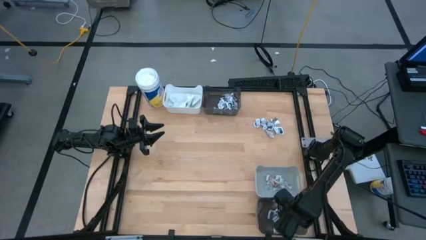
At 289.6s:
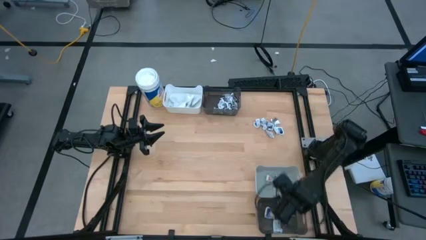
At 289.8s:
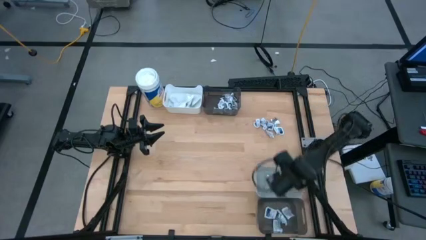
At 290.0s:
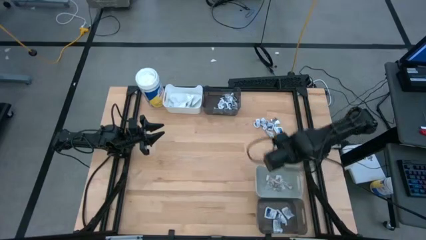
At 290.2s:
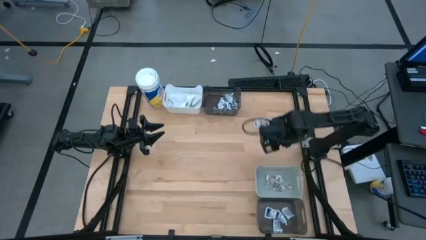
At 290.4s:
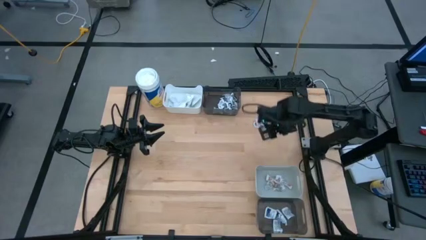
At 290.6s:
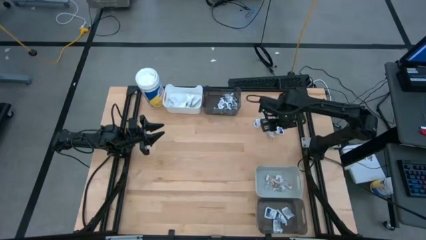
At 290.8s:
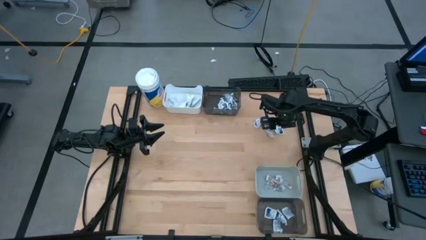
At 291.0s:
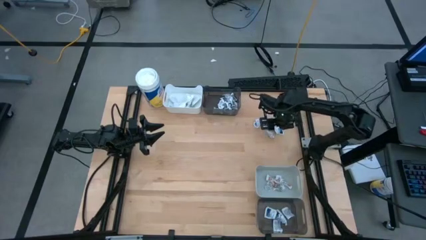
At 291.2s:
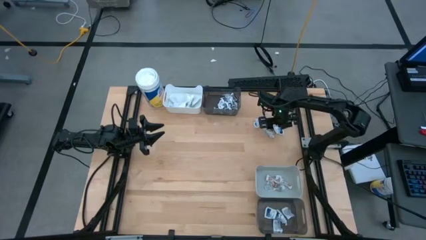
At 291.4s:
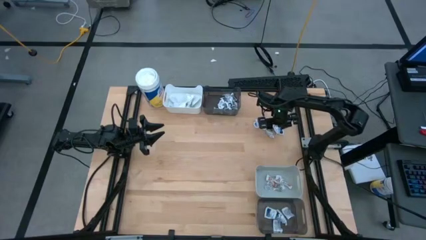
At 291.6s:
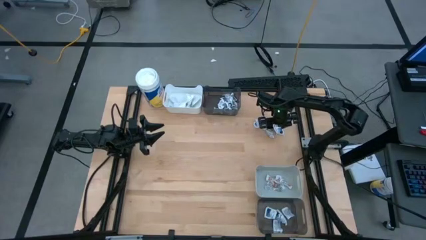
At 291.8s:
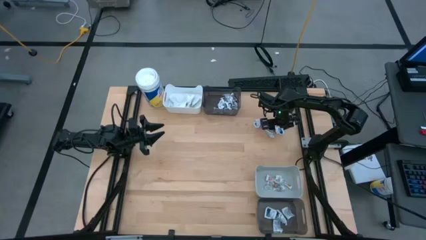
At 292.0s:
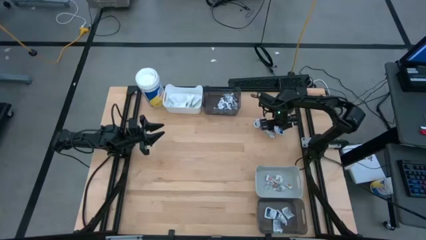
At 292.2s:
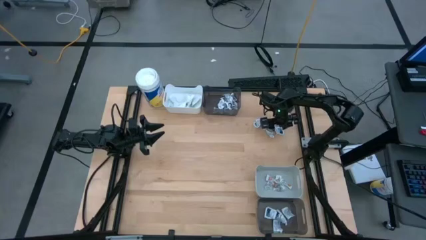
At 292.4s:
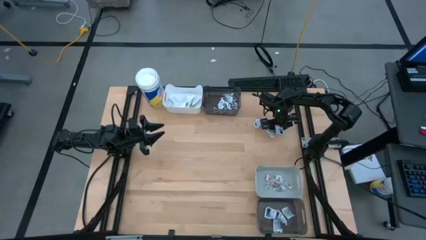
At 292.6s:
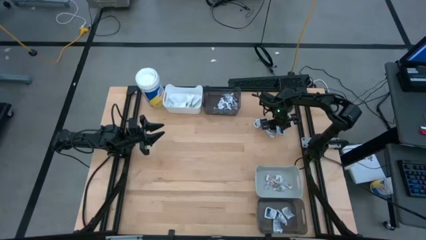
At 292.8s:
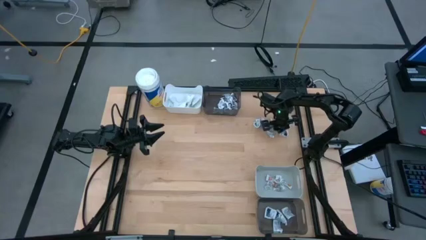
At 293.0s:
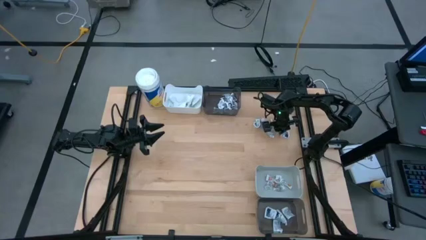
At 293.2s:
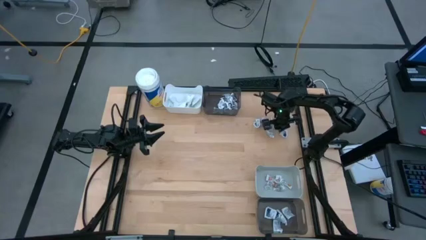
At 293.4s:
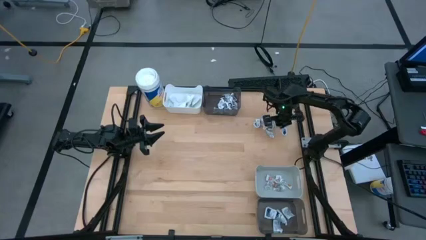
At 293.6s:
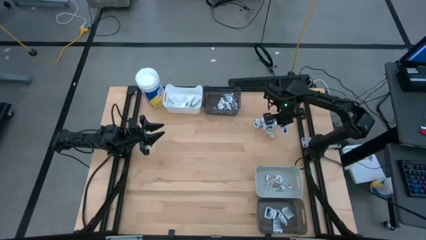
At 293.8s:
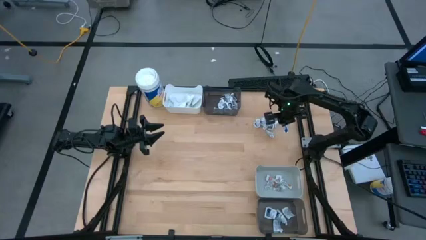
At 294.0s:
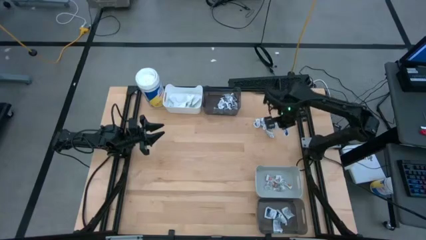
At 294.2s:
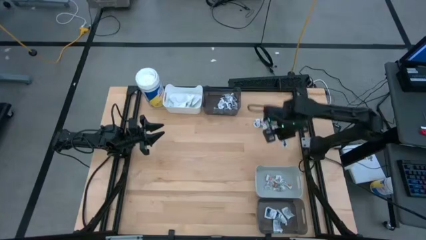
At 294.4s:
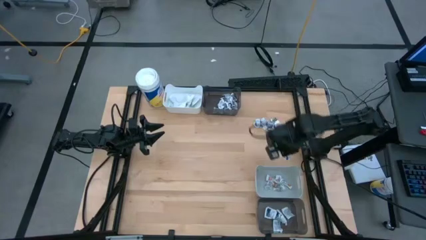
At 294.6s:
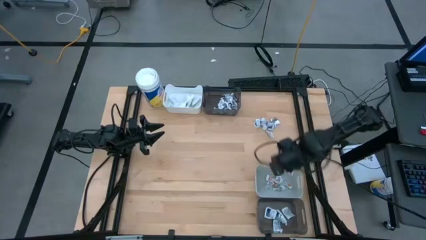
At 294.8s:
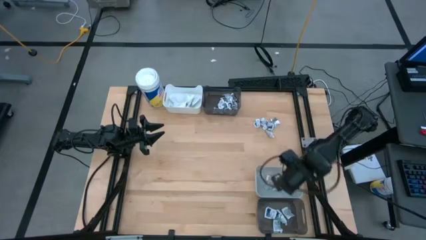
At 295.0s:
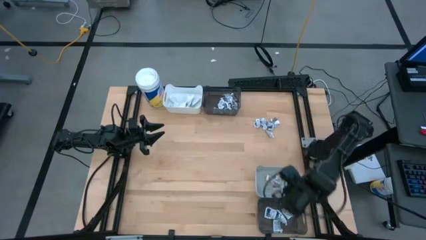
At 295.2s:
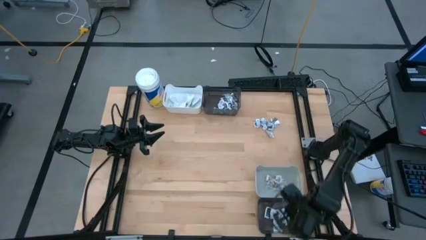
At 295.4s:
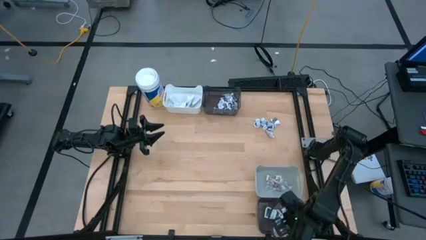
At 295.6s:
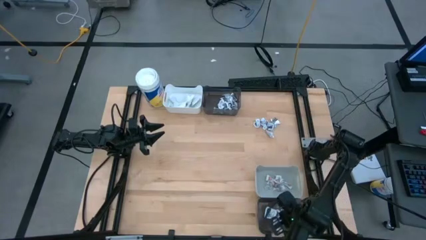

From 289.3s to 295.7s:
Task: Pick & Place First Aid Supplies
Put the blue alcohol pad into the bottom black bin

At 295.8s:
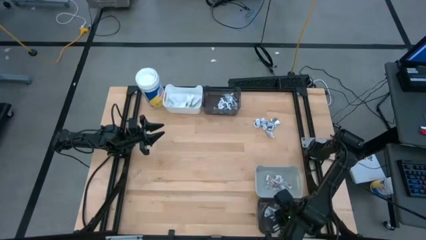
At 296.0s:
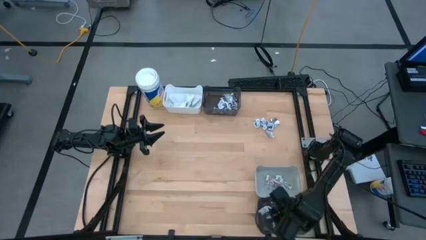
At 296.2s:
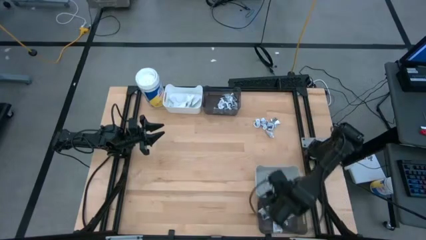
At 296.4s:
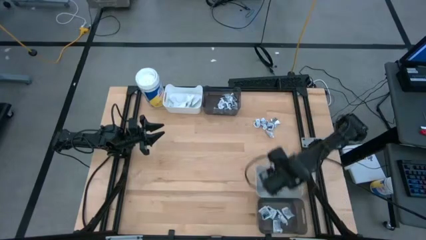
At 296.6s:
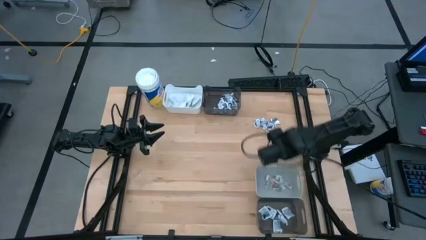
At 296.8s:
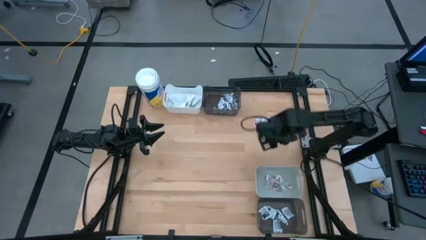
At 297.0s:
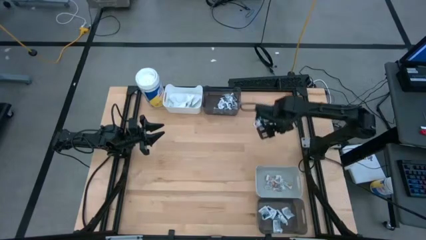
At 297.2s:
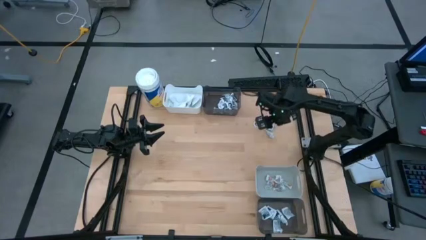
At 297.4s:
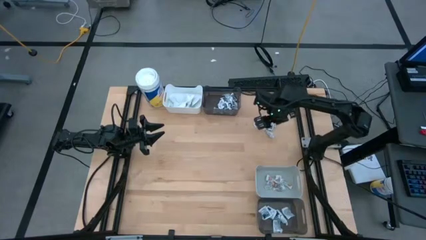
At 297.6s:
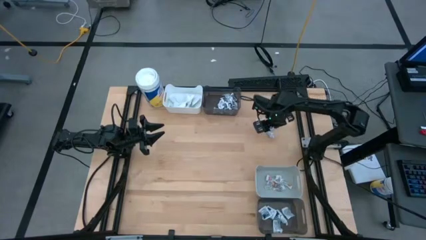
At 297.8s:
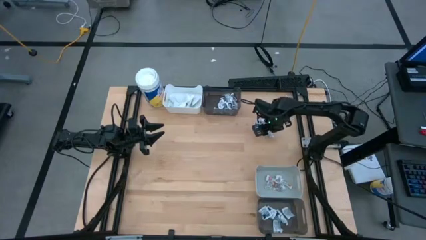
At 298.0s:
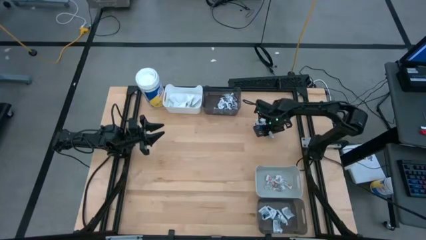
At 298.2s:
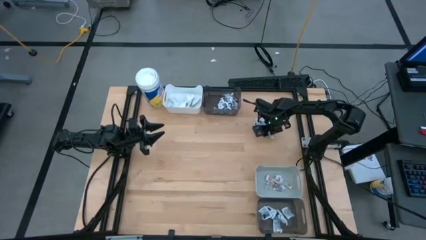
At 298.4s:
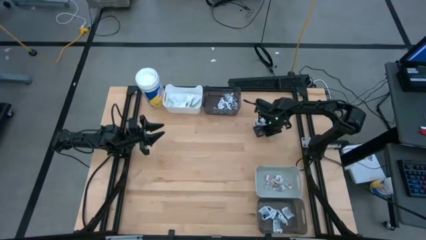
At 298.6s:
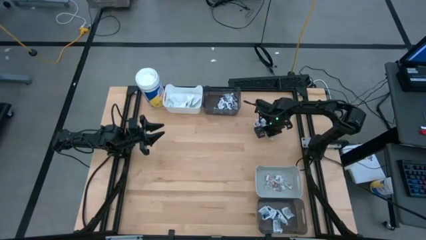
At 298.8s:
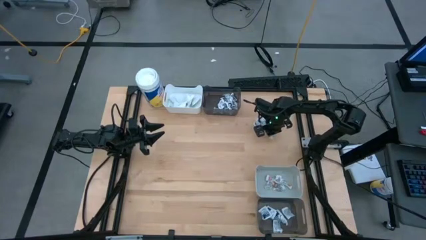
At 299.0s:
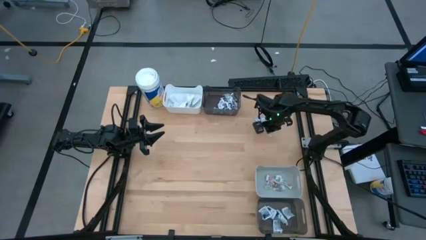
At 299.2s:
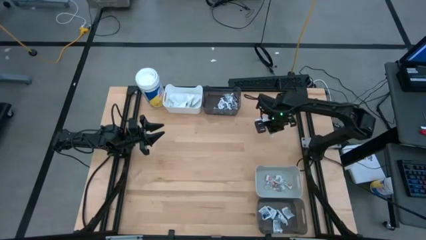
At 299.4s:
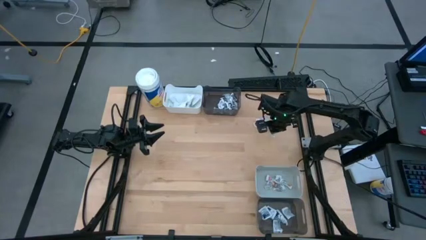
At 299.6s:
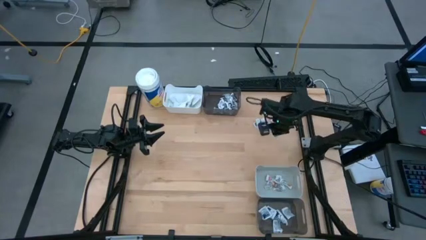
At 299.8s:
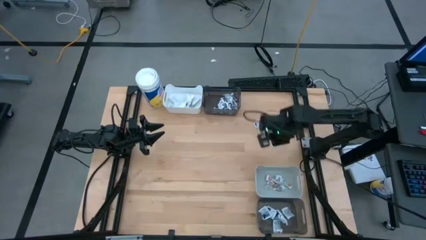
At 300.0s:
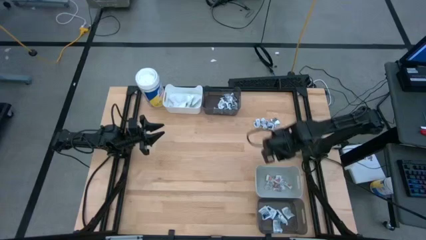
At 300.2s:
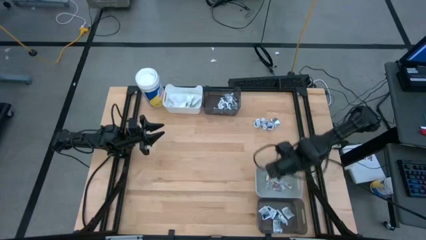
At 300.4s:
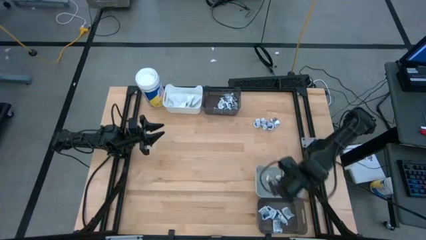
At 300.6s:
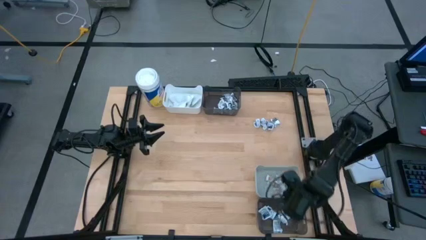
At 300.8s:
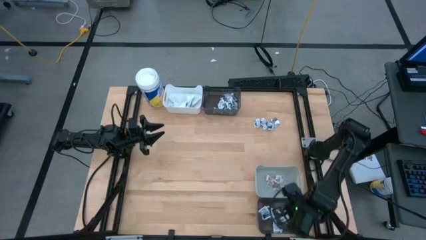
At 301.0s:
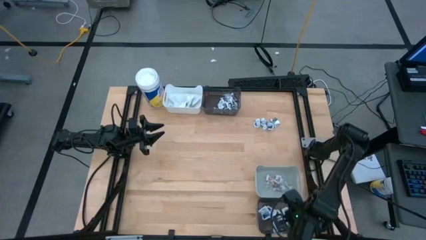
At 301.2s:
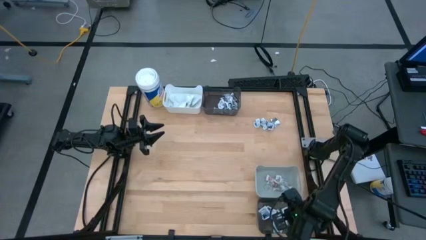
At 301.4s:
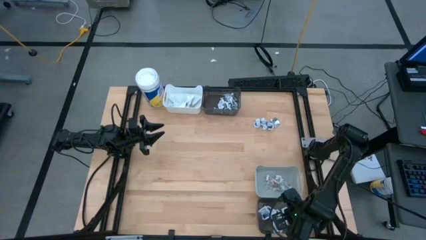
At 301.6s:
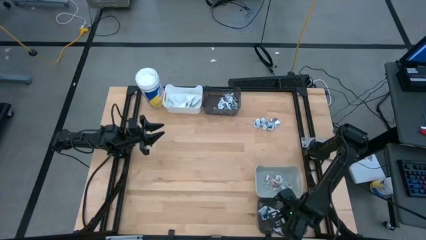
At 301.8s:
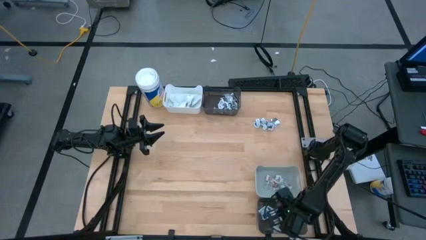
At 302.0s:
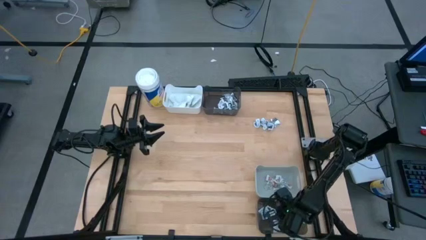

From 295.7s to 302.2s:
Put the blue alcohol pad into the bottom black bin

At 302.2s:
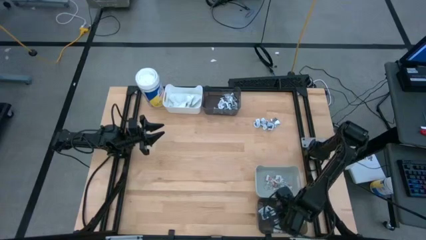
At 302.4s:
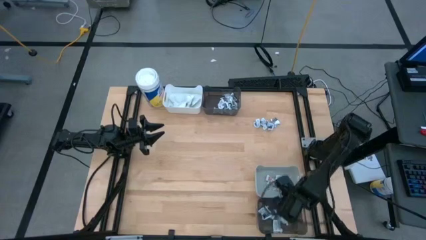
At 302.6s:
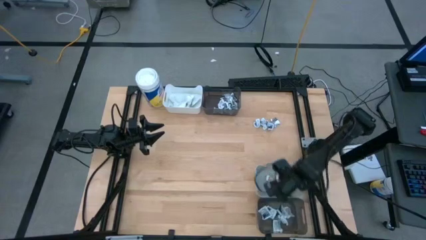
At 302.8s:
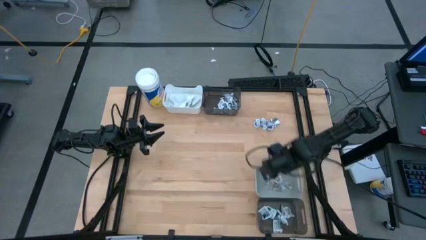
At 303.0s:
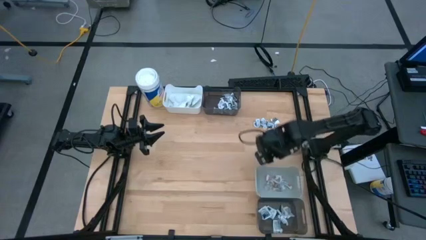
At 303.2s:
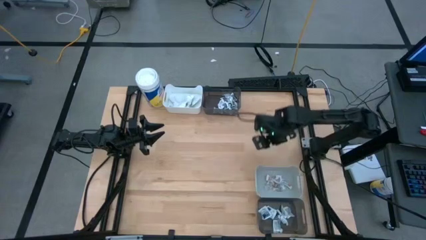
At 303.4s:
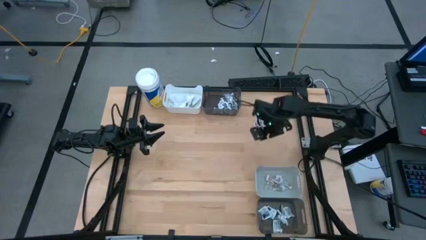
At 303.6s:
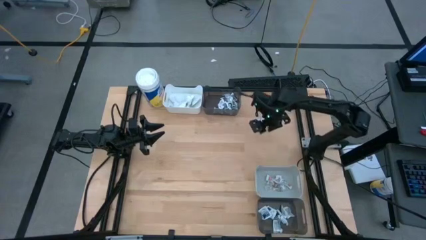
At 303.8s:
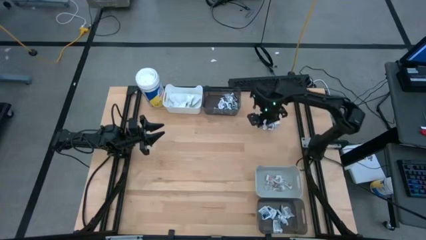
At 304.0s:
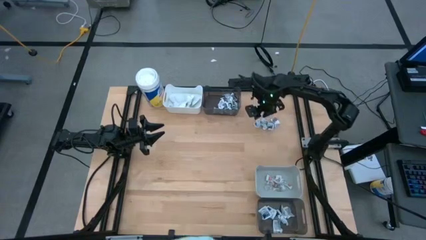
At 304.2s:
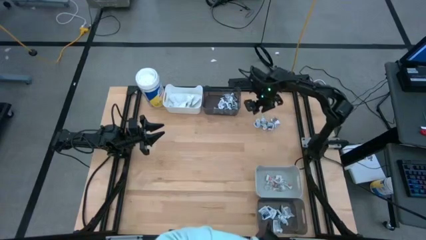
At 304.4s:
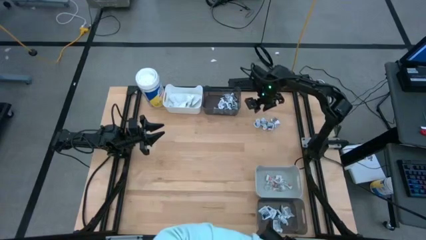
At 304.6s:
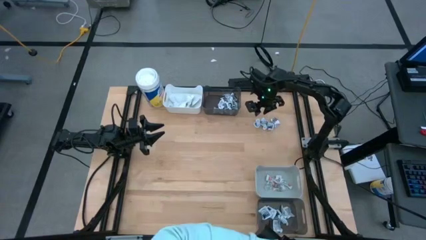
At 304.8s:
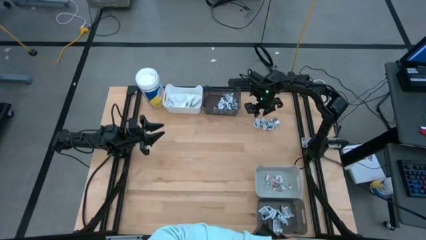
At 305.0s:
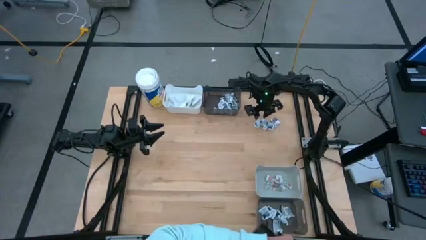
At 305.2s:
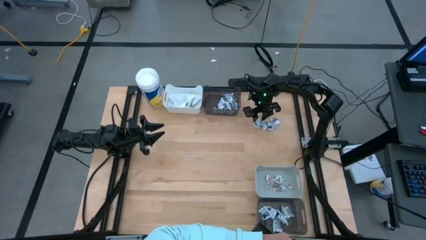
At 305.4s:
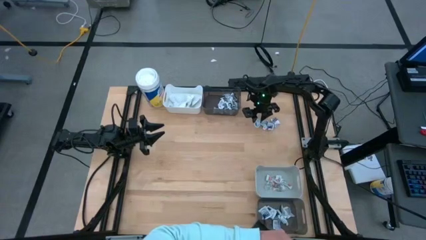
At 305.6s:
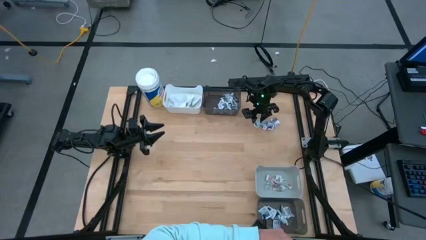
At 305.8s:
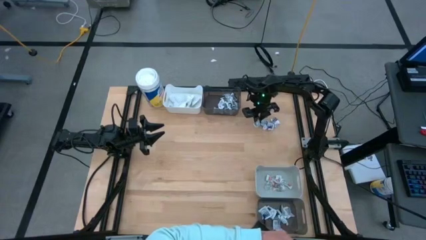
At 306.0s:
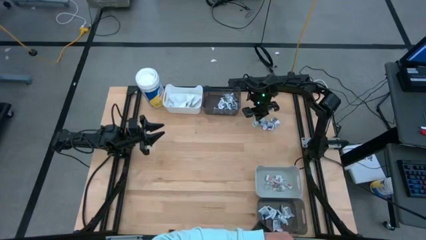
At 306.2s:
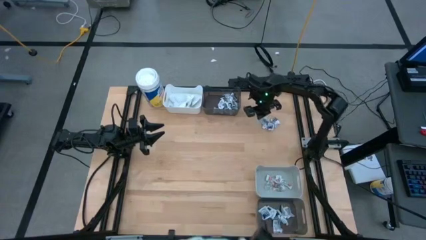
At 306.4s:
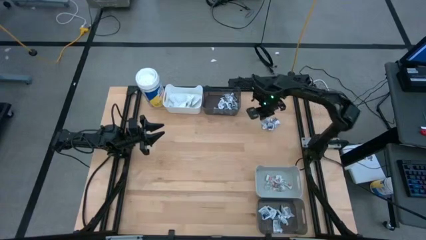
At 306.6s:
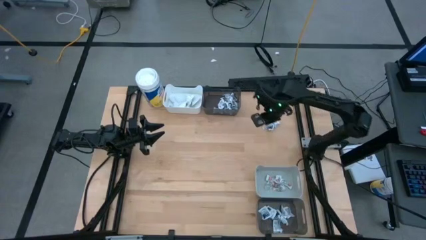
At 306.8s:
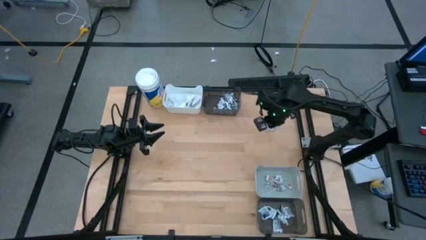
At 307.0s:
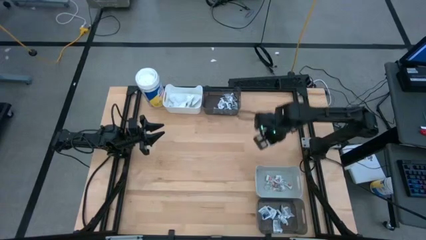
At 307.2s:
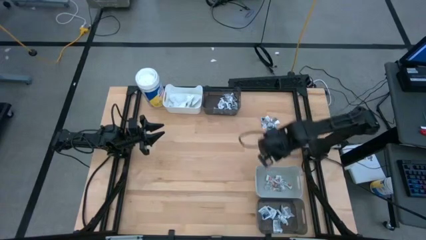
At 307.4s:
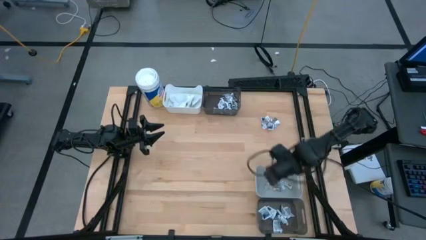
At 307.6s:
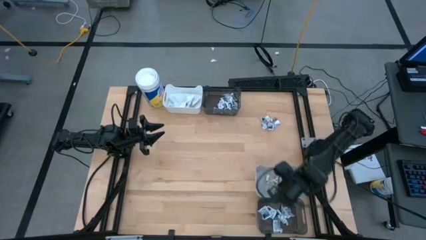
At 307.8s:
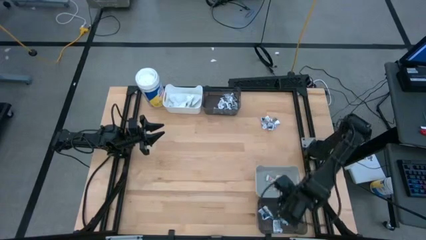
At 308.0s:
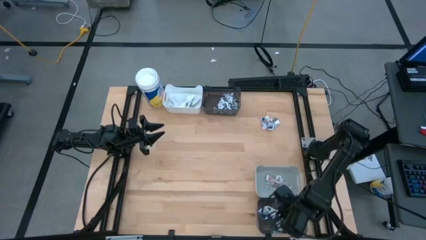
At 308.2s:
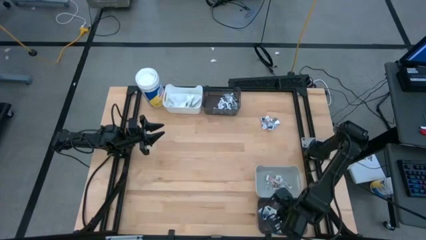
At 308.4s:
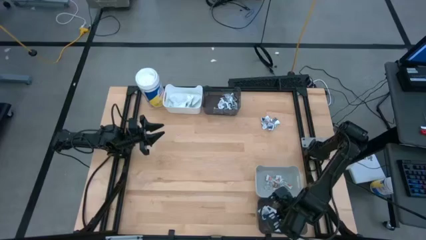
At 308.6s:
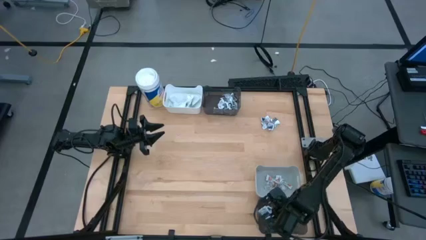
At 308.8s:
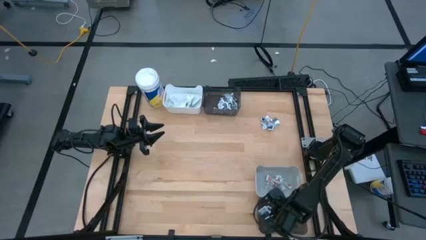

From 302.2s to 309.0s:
Put the blue alcohol pad into the bottom black bin
